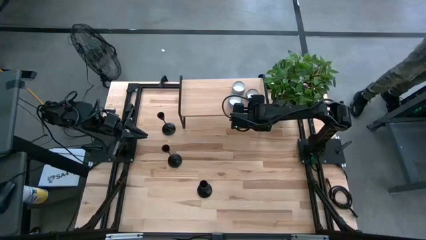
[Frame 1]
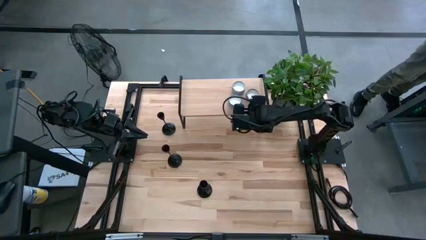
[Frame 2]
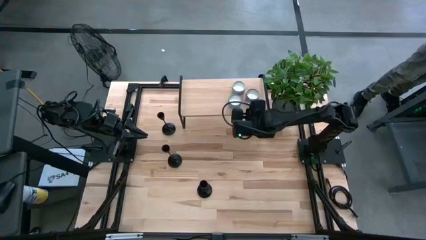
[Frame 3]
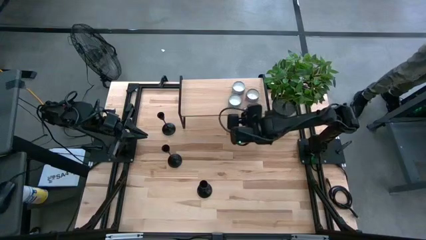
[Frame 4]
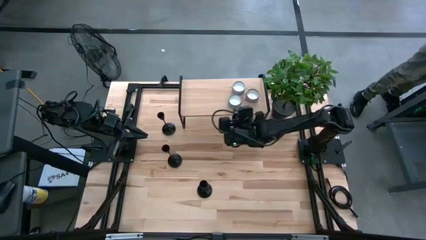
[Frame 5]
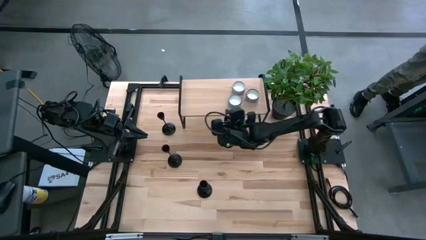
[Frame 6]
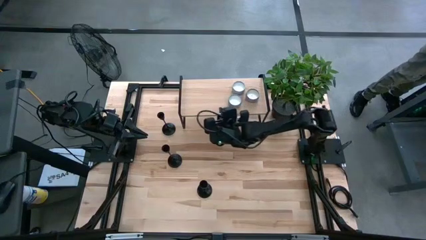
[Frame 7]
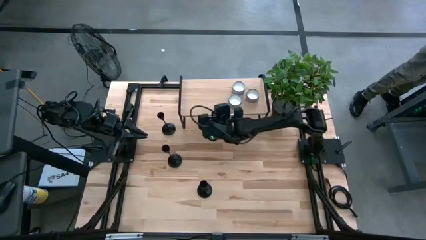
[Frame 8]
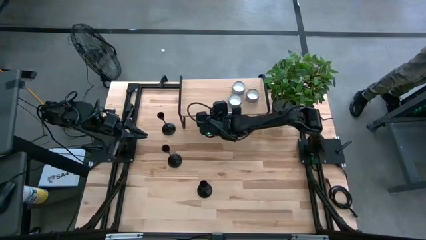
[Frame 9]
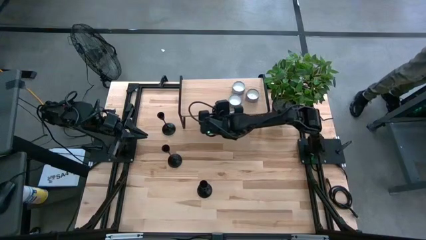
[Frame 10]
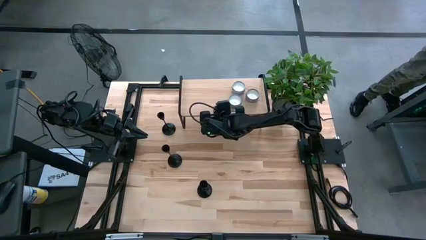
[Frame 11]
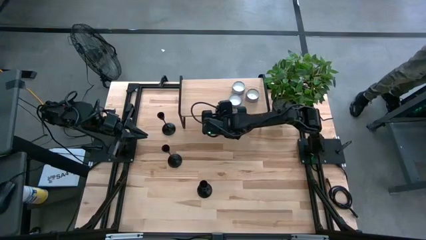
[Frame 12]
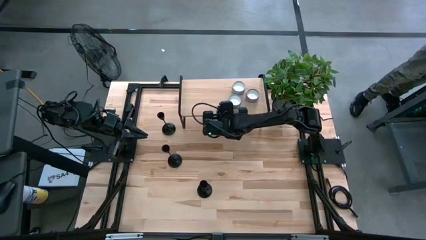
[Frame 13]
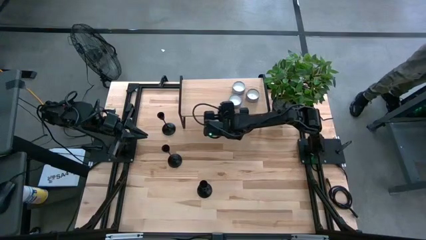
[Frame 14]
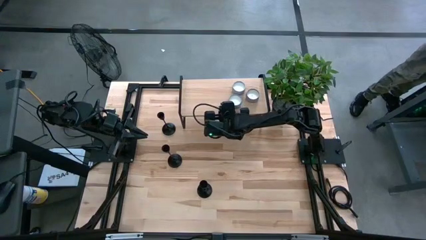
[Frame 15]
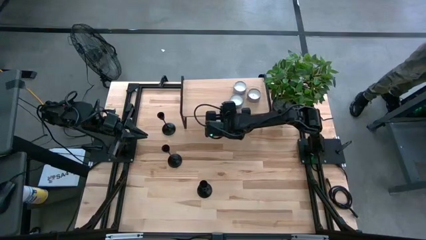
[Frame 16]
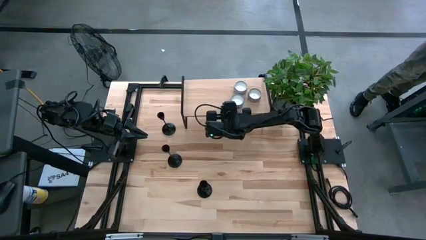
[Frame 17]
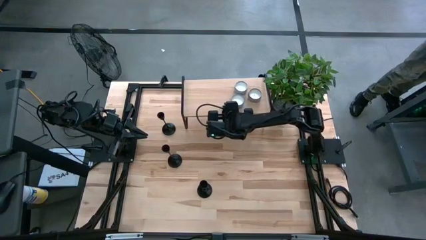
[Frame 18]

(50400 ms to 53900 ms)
Task: Pick & Place candle stick holders
Adjust the shelf on the table

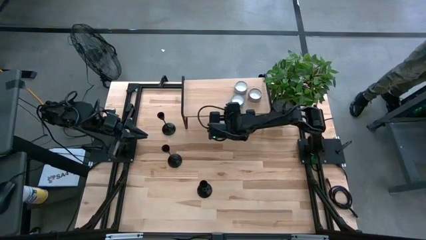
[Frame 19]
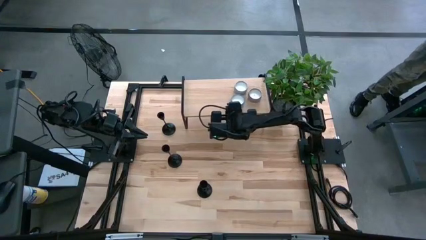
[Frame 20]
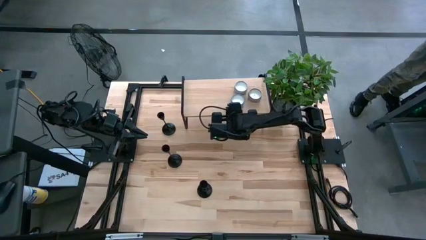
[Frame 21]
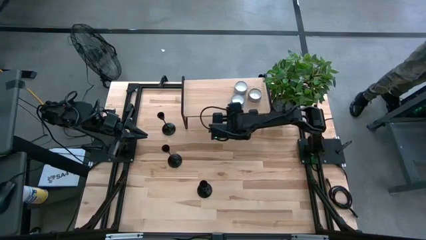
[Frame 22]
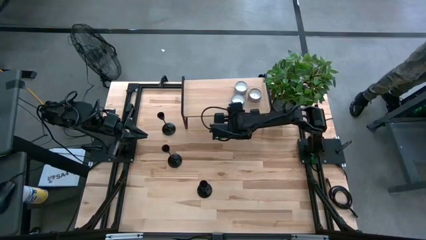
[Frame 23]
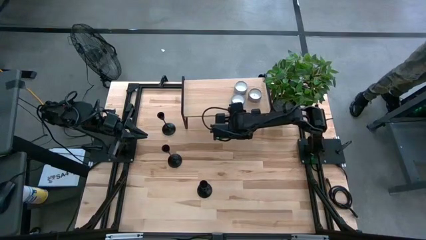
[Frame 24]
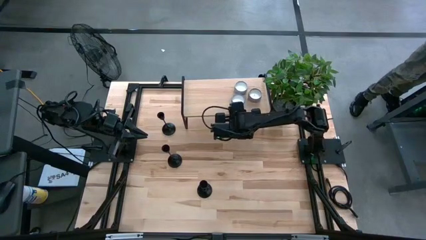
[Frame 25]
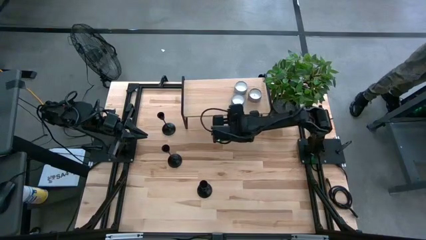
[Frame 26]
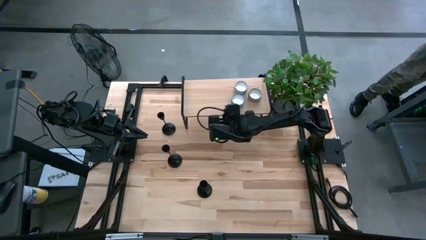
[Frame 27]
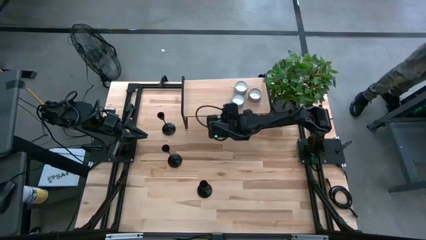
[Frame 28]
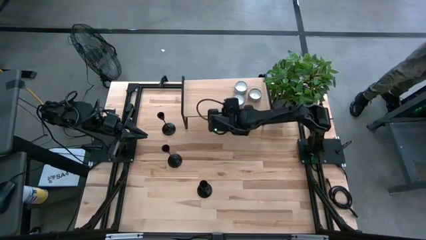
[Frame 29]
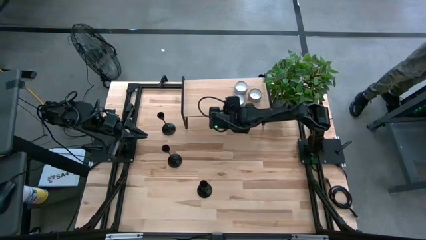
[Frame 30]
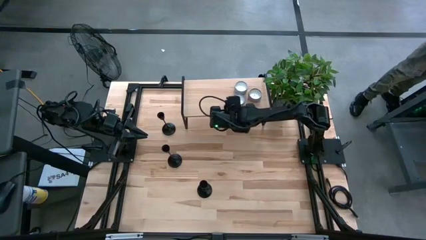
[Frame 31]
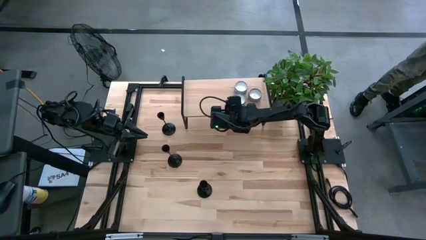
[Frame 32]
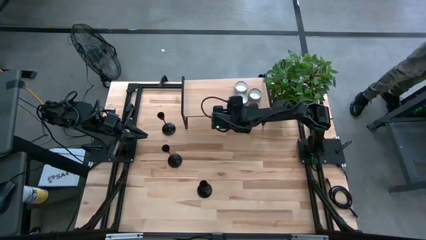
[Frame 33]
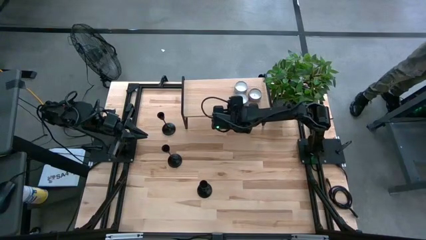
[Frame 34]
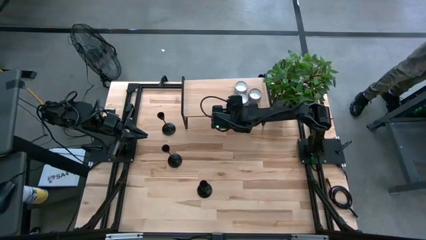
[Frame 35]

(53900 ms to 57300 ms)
Adjust the blue scented candle

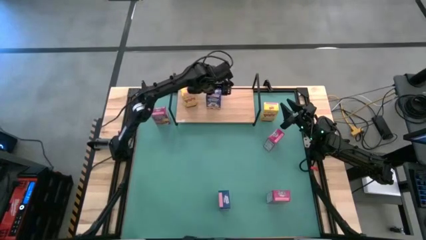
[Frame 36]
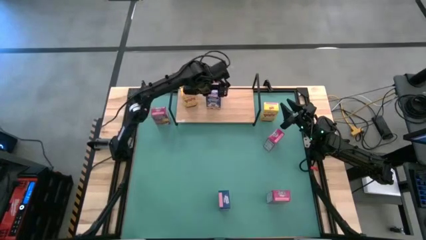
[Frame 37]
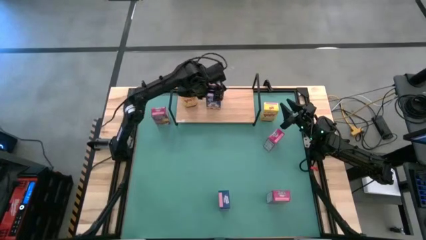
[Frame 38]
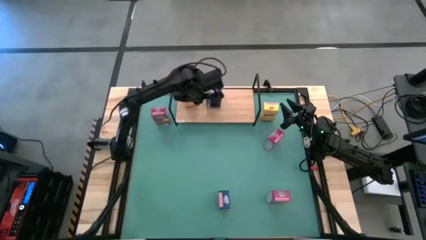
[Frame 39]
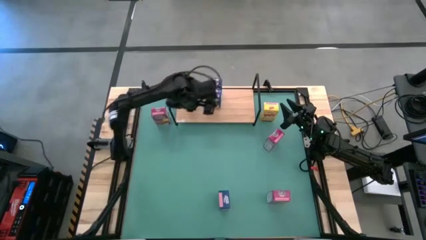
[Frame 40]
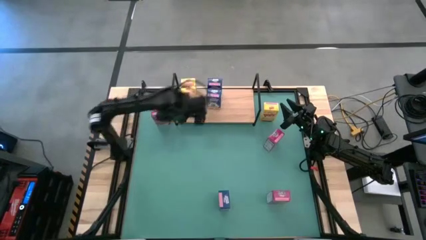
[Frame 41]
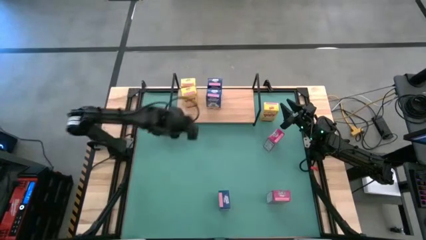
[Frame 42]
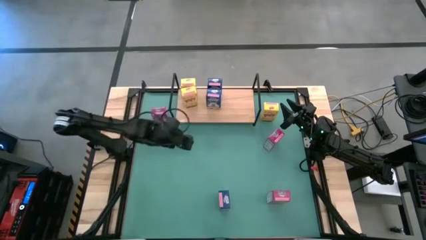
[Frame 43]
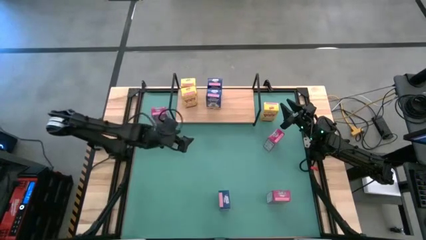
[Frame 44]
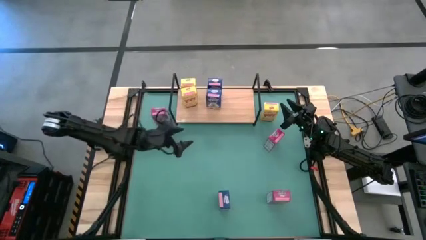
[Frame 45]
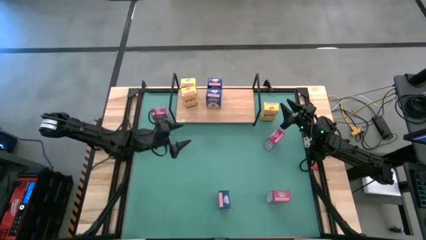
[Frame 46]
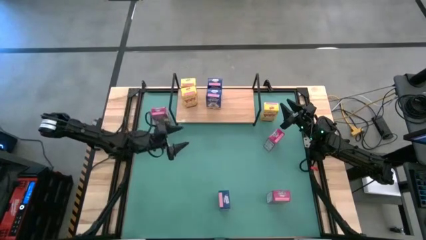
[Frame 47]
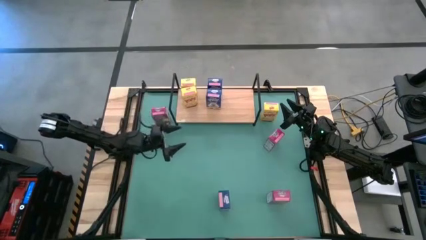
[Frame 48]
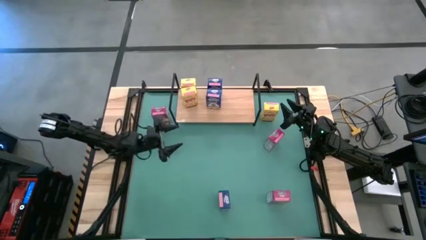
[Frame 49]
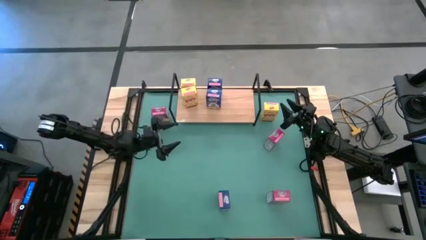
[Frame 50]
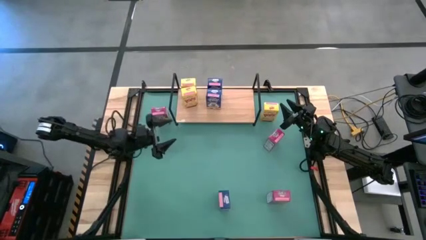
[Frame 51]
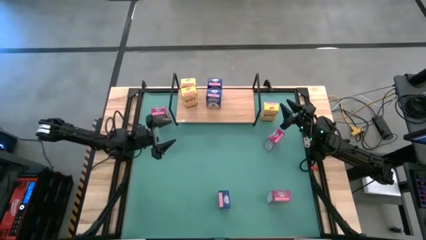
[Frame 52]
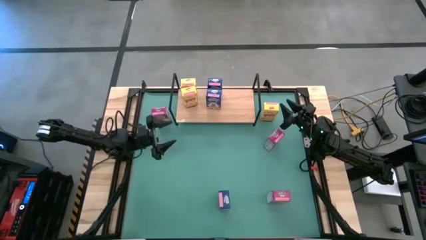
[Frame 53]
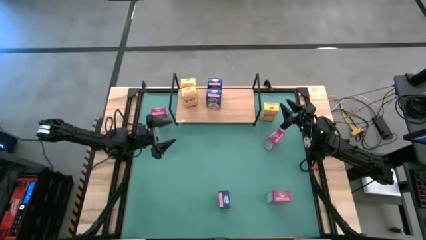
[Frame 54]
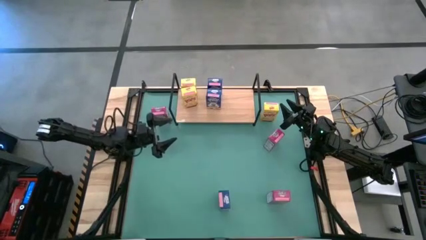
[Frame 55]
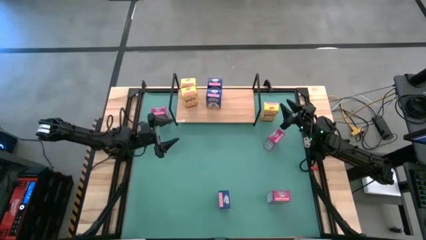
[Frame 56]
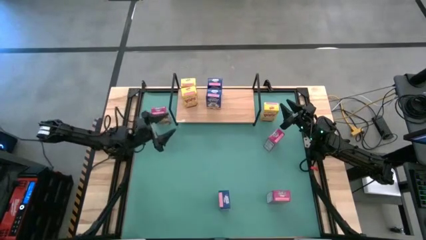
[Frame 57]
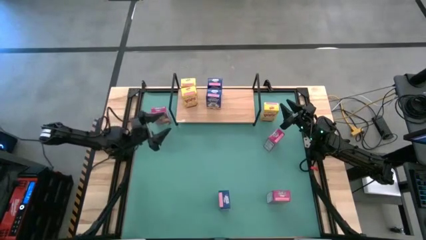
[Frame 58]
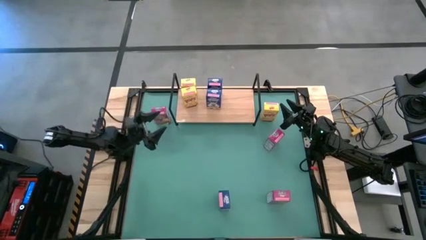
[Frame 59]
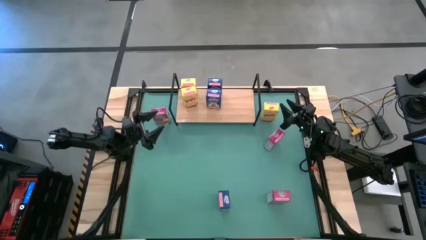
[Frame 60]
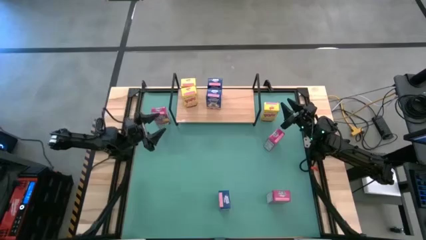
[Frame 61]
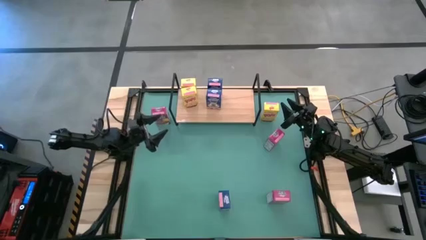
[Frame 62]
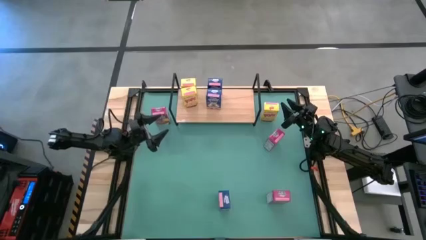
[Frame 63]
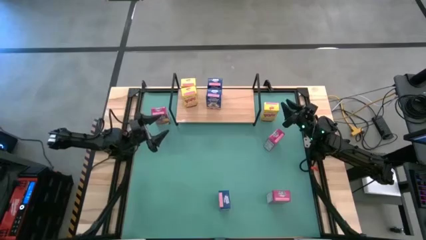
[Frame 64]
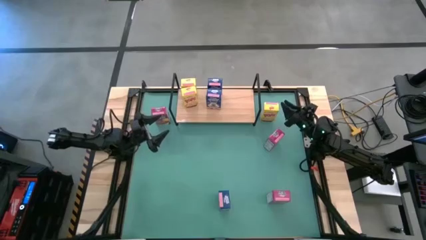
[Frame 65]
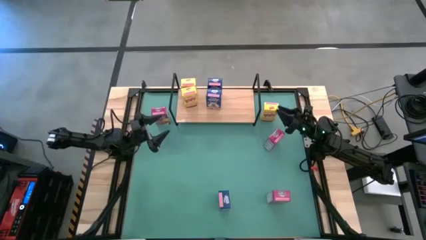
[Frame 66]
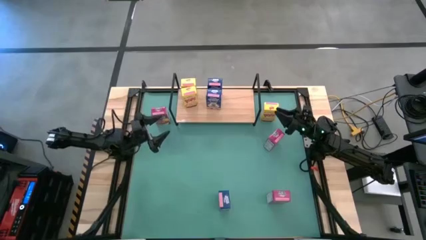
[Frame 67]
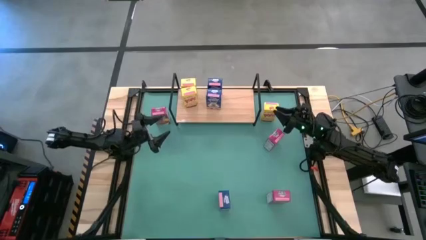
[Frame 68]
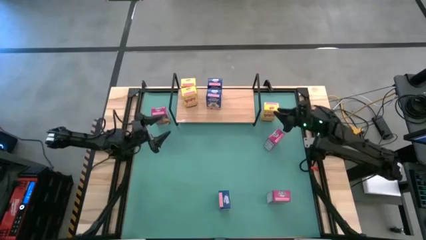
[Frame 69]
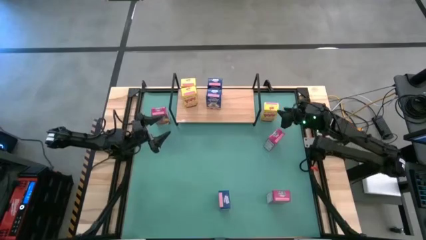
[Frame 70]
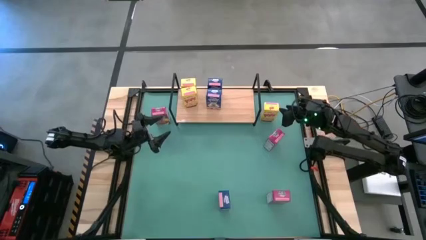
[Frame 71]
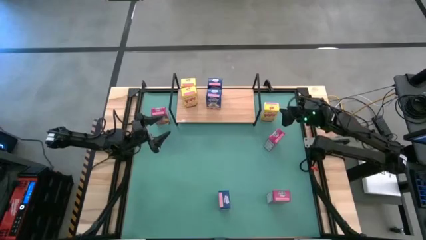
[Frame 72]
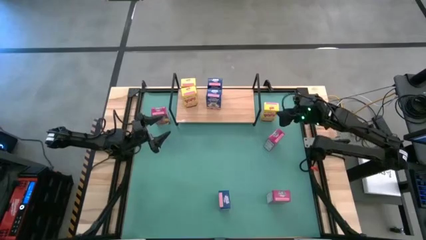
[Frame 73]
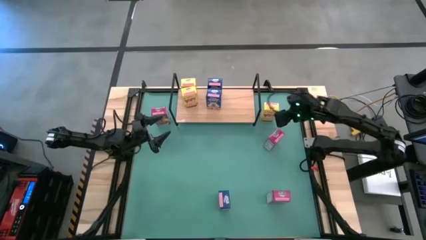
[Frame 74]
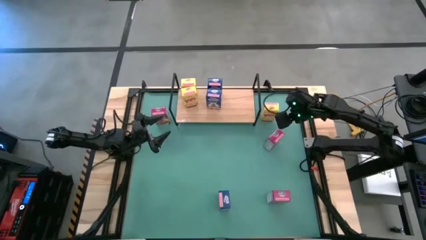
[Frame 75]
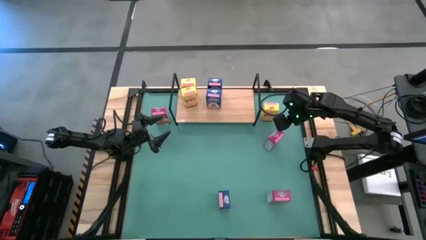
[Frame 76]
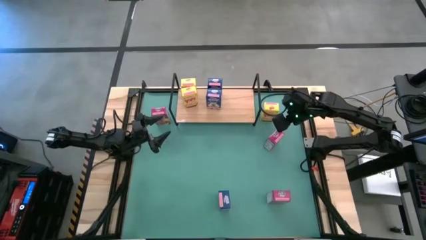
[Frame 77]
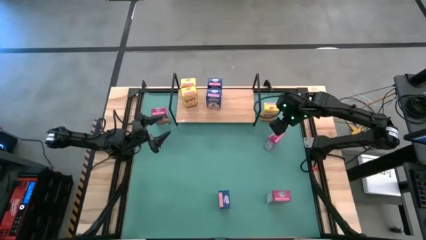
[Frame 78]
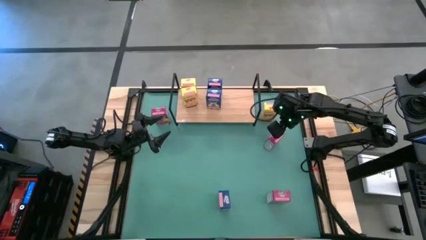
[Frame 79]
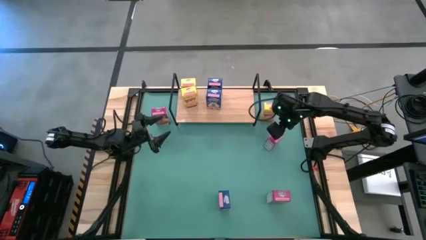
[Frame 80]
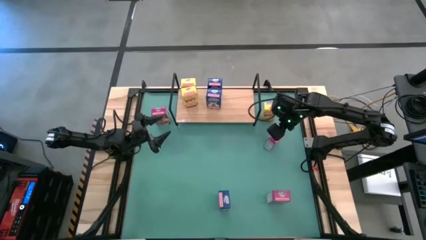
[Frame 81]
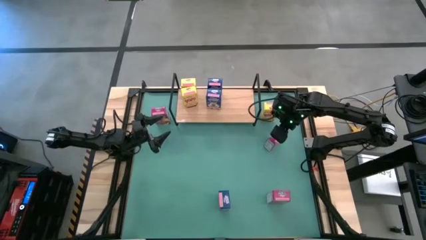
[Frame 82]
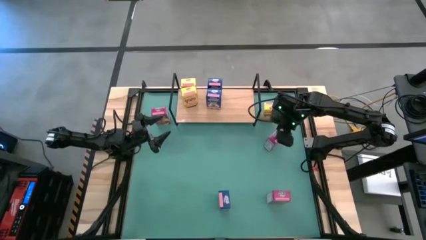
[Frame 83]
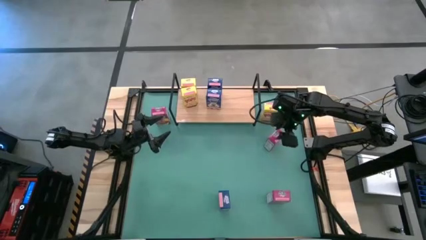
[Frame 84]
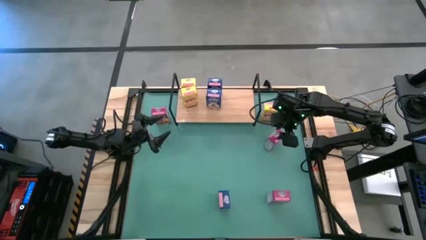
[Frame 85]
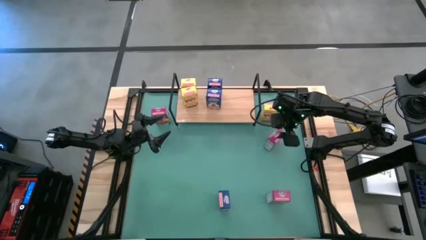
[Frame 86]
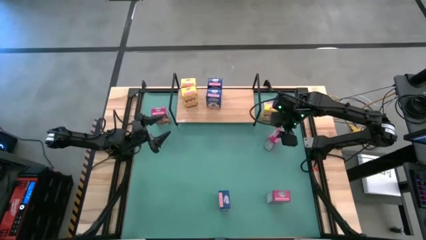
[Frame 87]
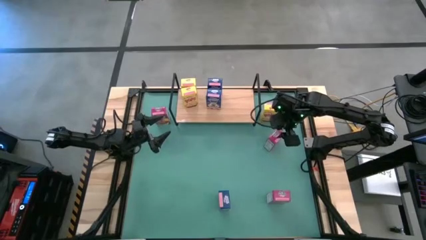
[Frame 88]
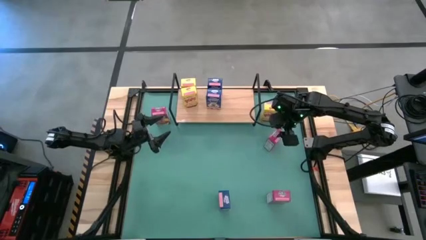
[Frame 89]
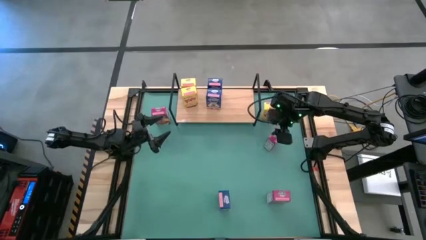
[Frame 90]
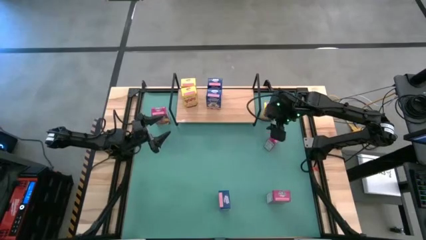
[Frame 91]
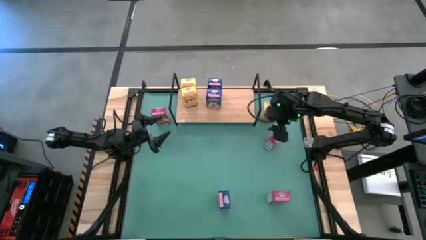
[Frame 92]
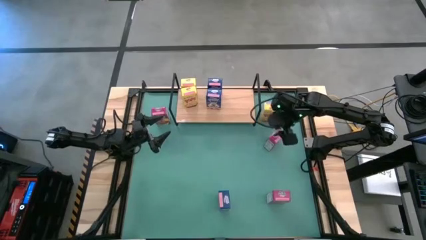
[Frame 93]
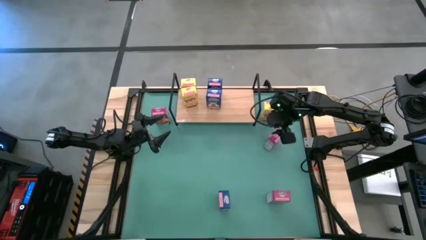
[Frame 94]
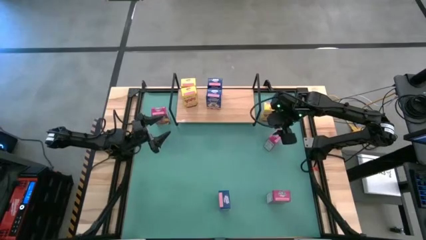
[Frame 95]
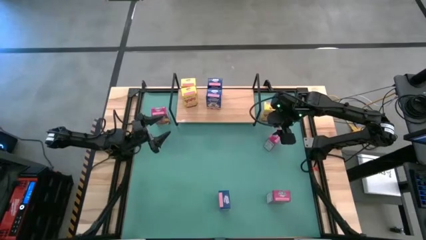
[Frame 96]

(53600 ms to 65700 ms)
Task: Stack cereal on shelf
Put the middle pink cereal box on the shelf
